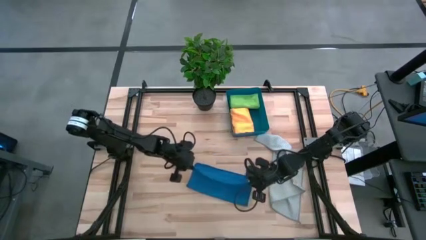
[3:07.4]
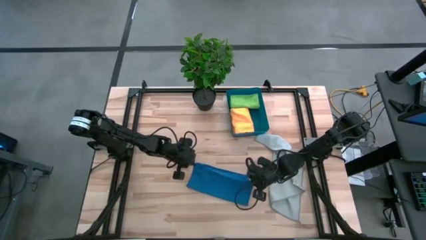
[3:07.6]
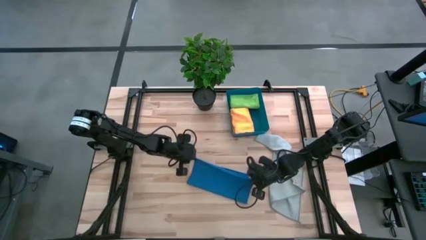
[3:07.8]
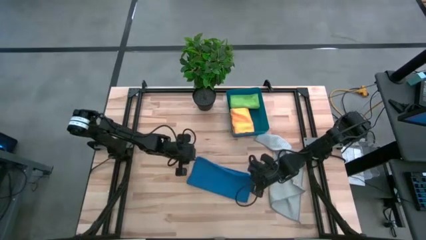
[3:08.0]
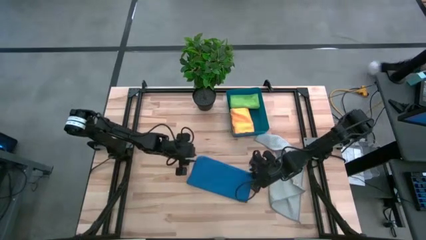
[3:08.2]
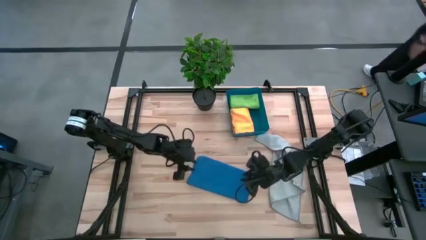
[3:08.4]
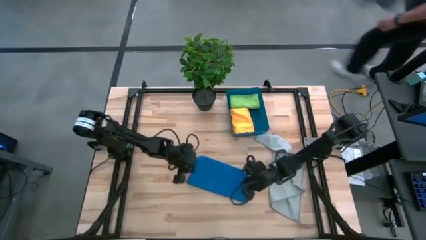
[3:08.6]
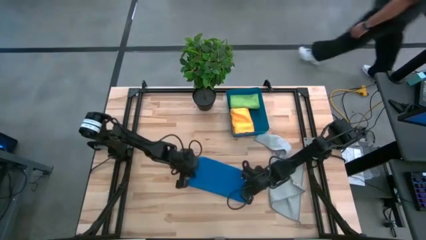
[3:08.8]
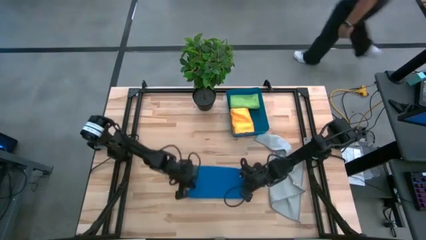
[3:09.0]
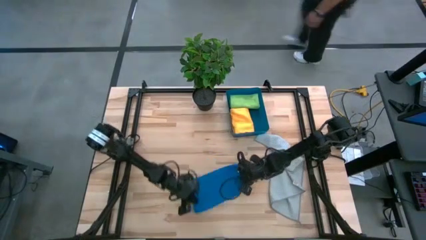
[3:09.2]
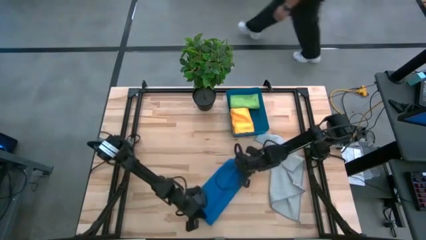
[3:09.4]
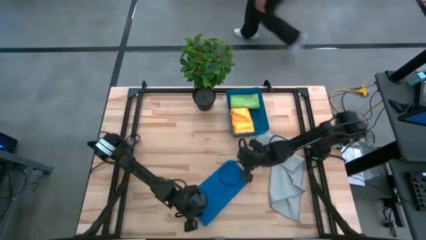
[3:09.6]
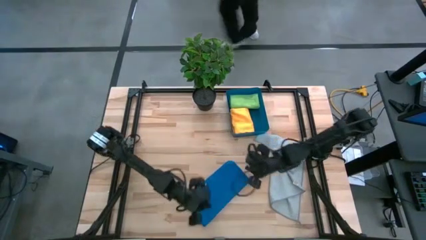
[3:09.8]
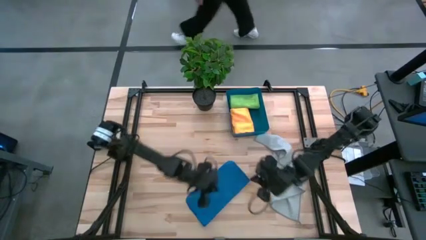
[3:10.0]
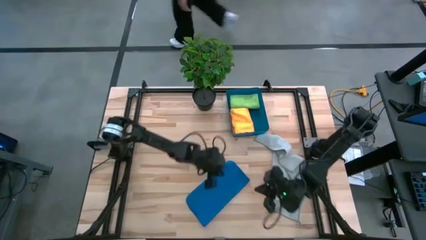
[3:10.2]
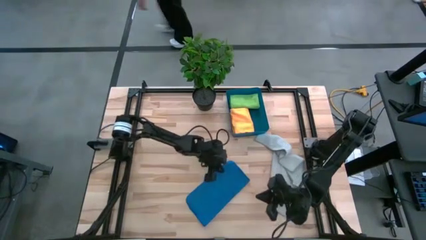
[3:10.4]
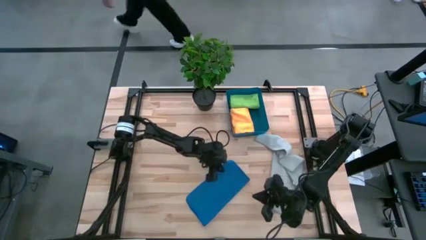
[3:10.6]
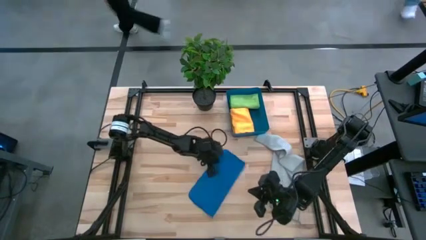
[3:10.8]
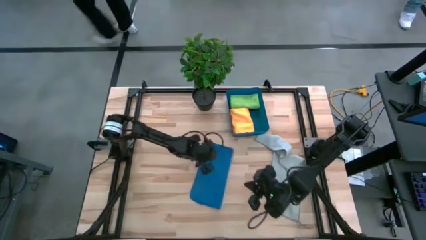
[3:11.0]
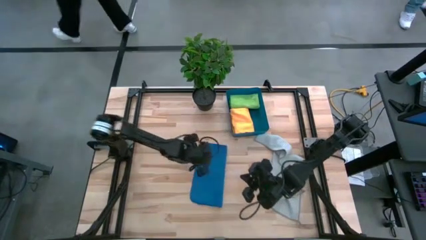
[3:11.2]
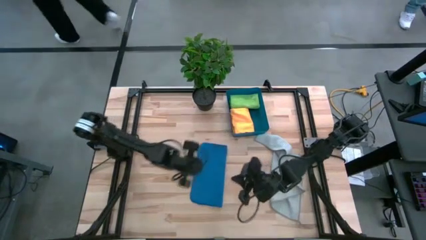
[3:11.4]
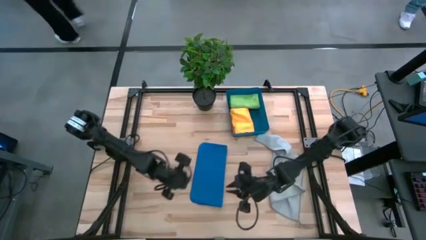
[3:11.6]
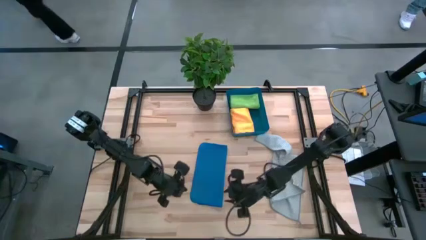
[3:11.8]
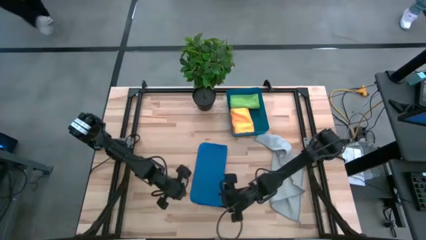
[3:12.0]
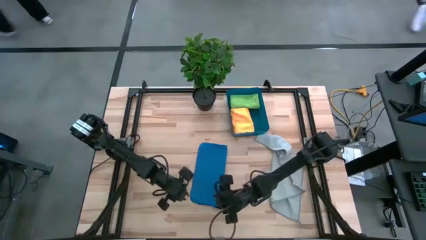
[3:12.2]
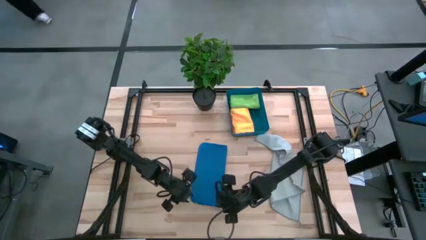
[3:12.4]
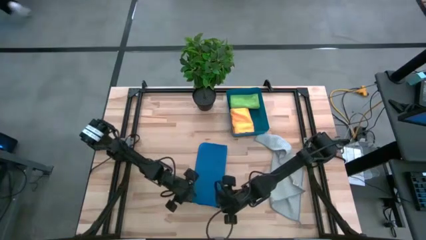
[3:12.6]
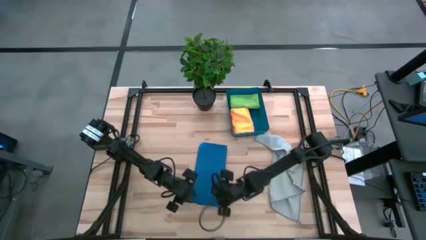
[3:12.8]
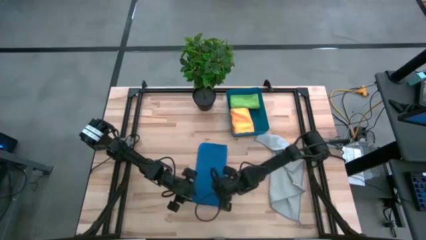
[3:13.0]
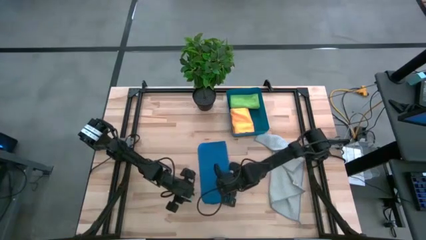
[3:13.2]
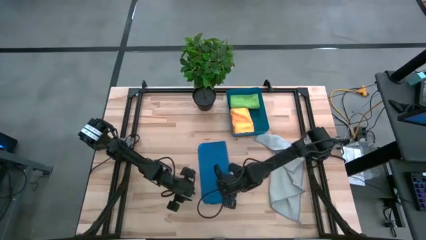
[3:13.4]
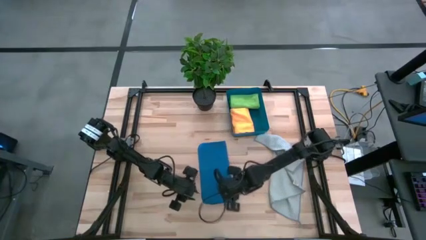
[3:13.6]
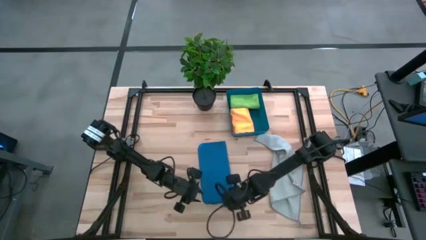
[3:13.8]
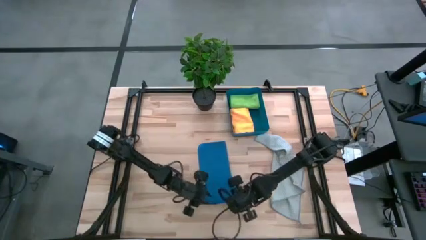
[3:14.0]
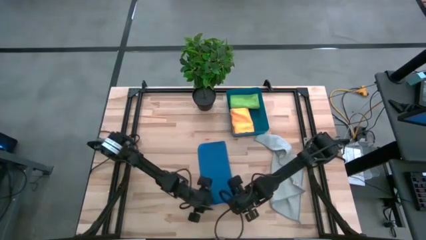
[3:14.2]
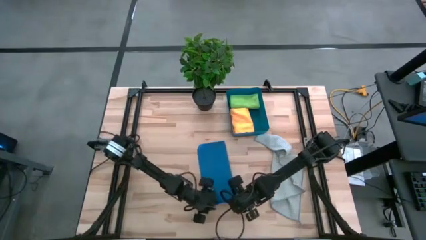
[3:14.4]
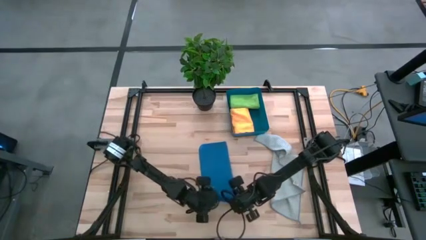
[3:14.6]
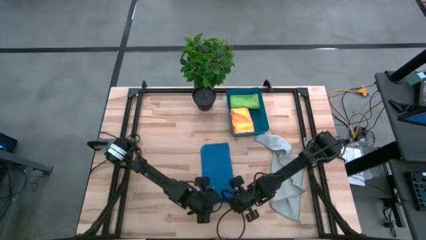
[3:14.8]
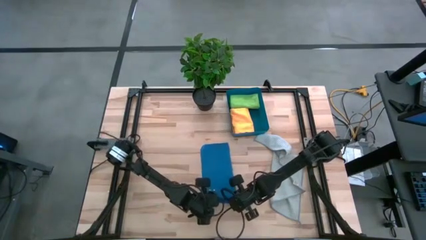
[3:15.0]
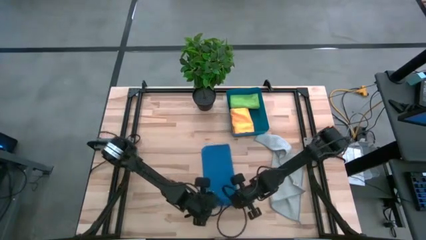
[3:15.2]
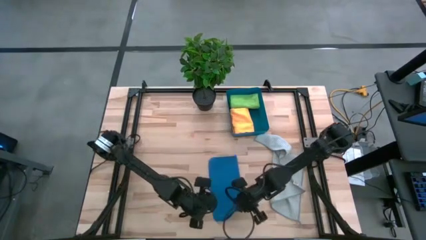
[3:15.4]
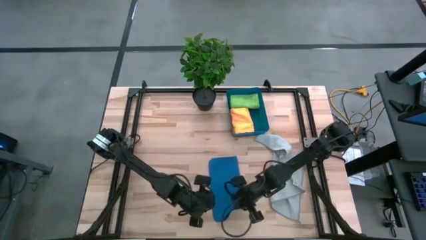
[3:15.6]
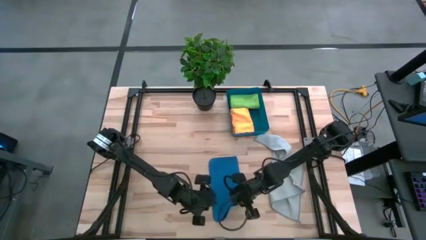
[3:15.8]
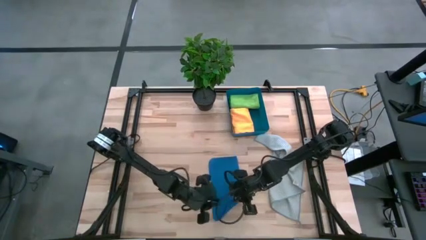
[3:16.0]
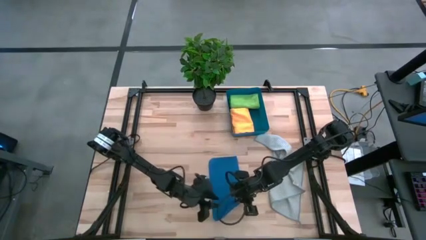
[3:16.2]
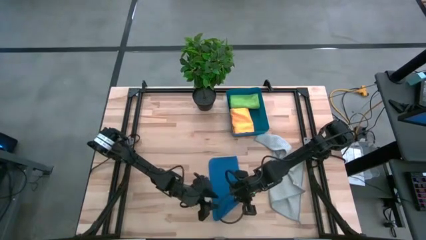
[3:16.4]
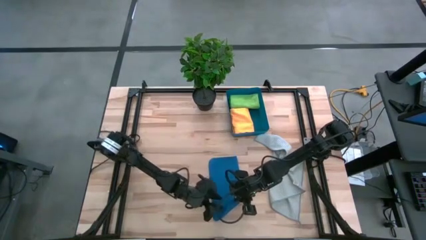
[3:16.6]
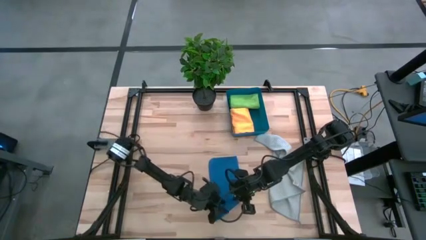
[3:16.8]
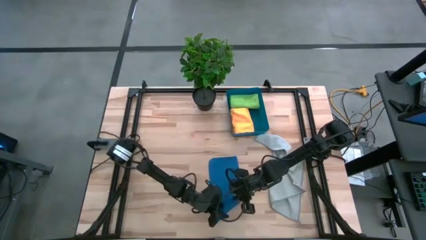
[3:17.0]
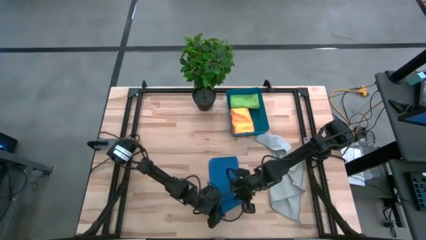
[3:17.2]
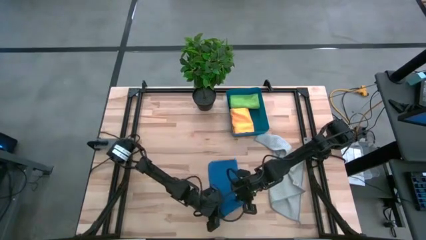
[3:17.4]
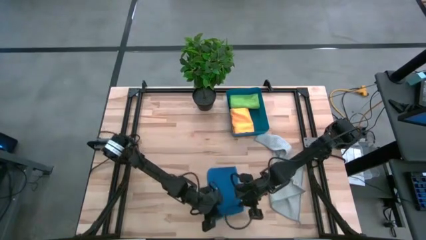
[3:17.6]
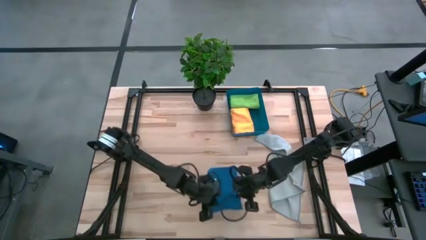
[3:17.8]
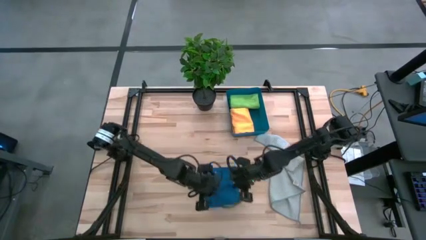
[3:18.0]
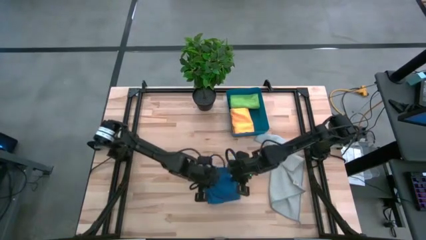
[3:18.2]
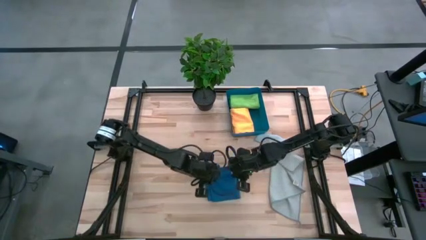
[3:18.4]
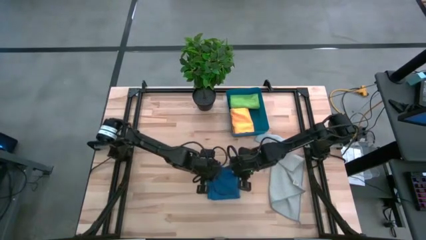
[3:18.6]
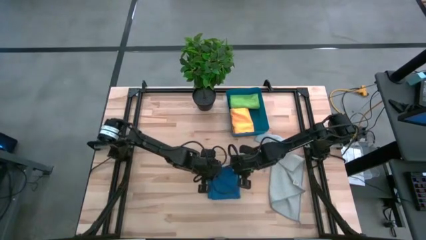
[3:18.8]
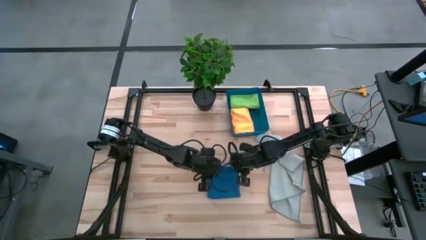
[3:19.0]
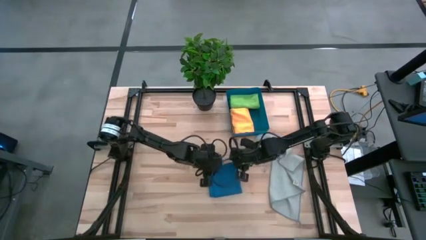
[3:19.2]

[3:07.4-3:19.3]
Task: Fold microfiber towels
Fold the blue microfiber towel

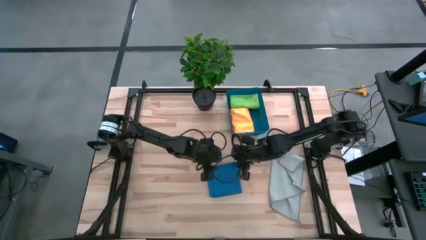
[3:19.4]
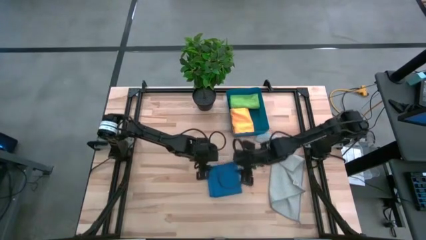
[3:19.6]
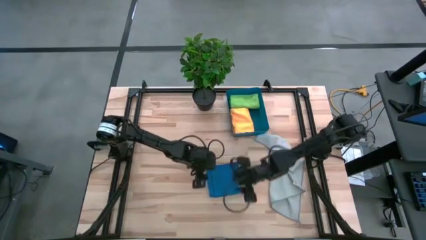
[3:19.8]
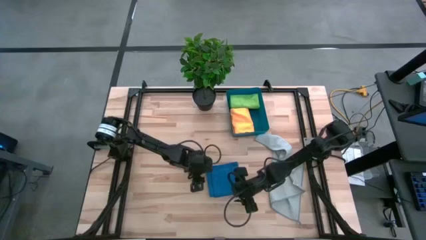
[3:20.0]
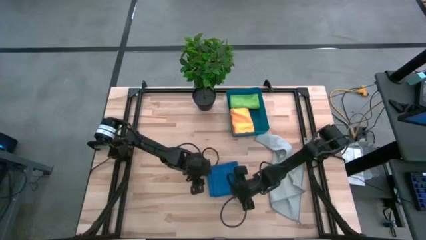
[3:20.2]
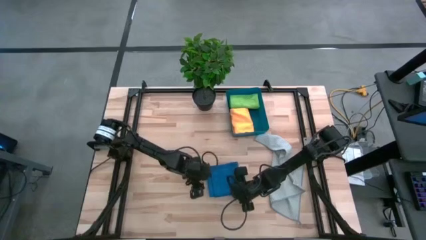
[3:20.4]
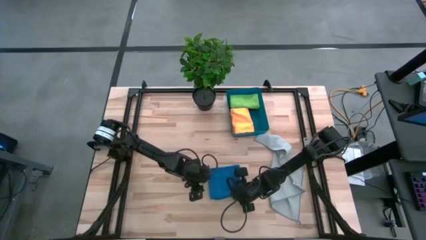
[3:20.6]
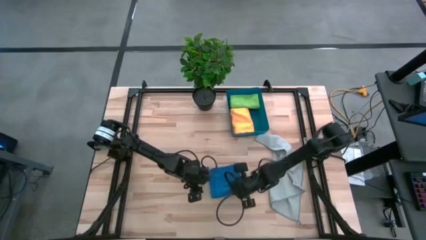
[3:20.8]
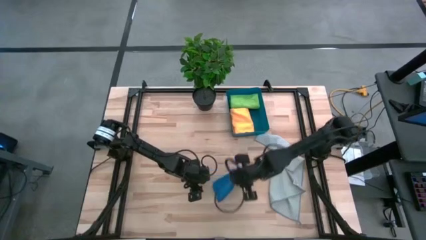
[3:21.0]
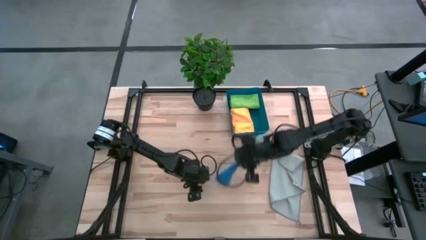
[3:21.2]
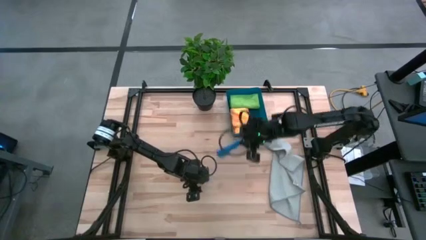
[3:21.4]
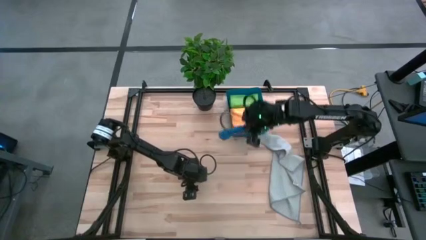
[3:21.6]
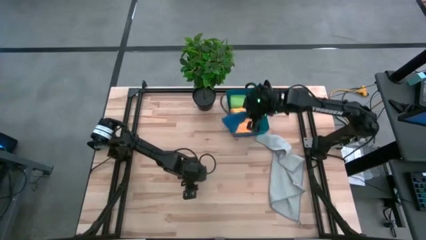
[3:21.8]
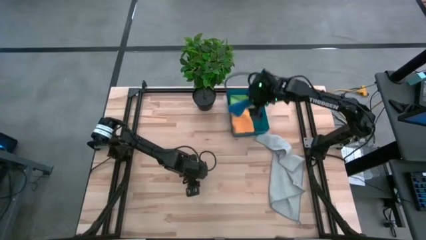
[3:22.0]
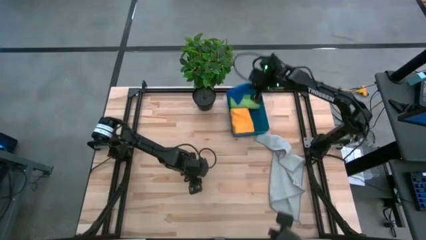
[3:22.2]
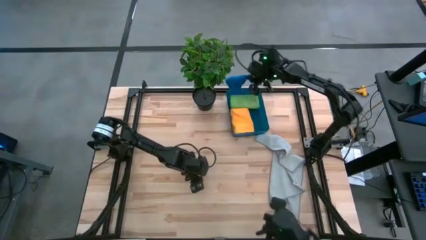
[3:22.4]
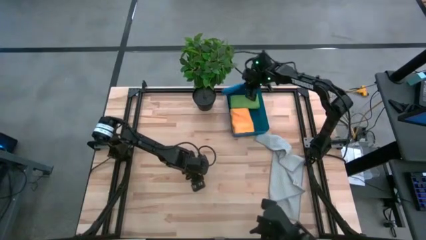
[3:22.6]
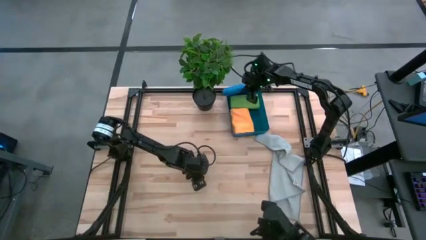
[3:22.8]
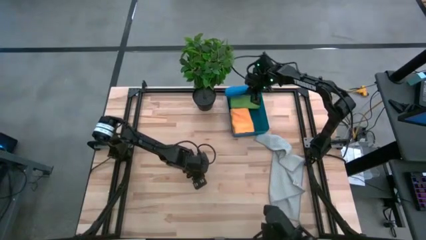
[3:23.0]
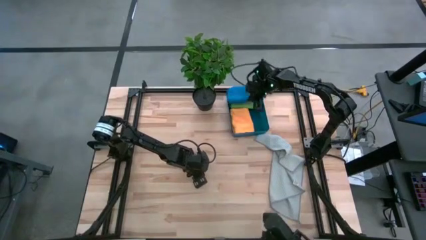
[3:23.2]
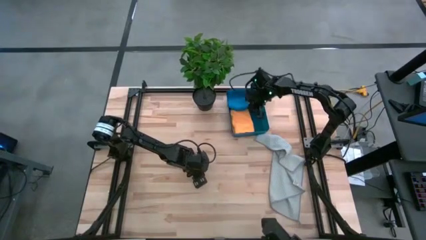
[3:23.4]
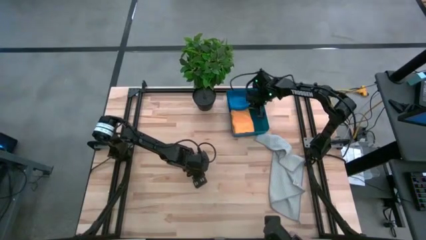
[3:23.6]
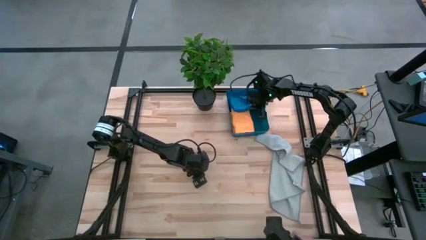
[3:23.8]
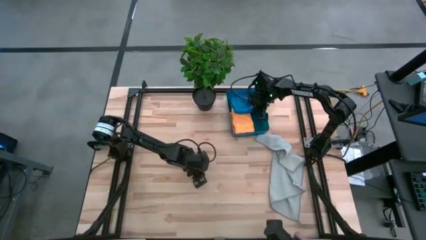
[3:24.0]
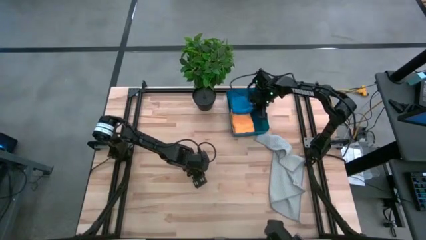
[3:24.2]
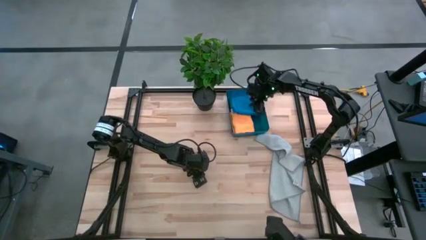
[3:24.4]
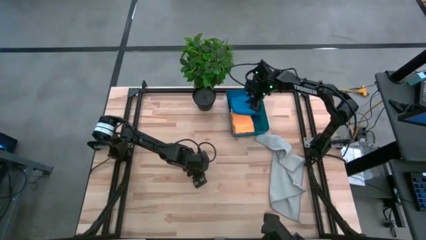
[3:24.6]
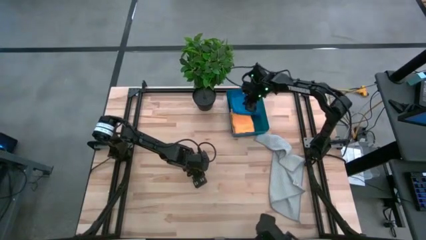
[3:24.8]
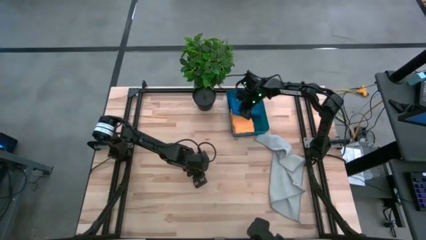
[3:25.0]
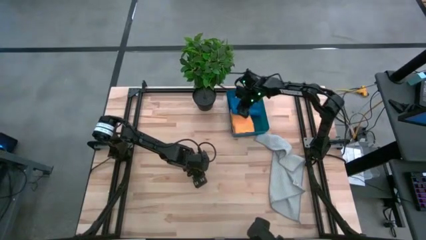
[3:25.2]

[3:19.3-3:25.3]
Put the blue microfiber towel in the blue bin
